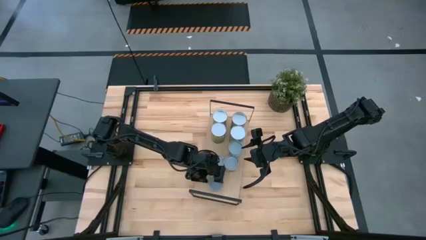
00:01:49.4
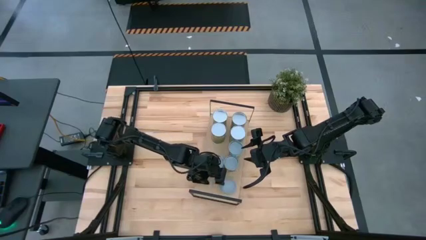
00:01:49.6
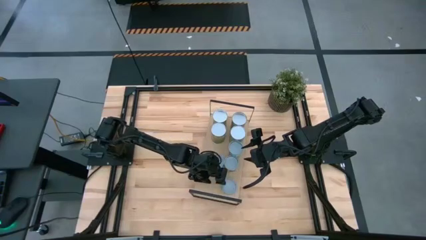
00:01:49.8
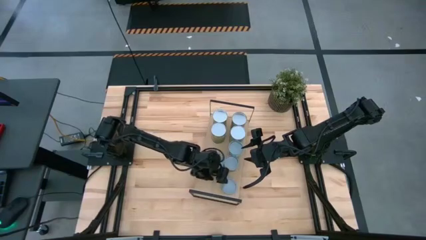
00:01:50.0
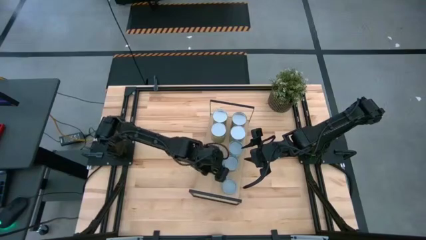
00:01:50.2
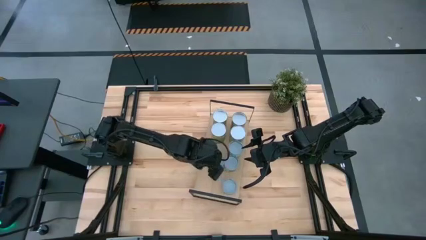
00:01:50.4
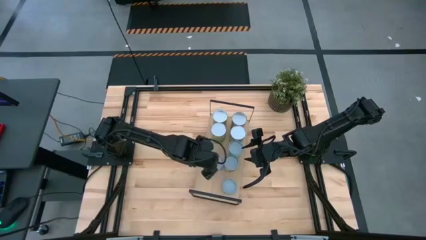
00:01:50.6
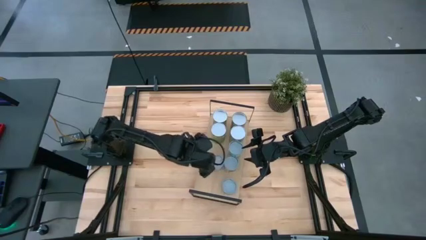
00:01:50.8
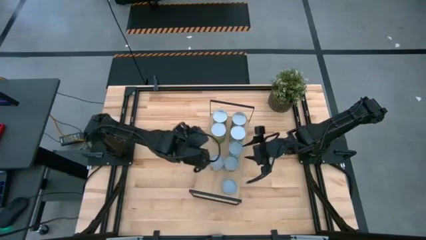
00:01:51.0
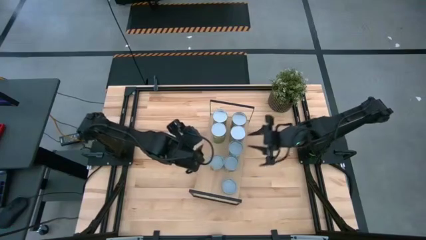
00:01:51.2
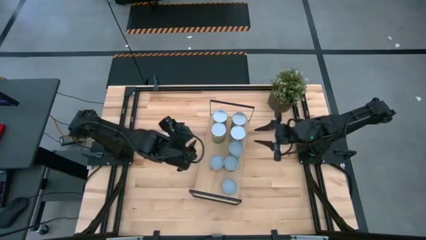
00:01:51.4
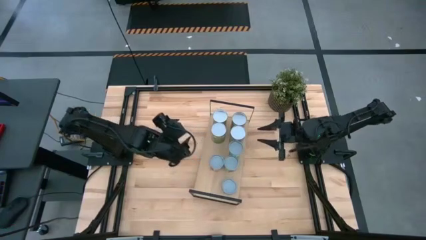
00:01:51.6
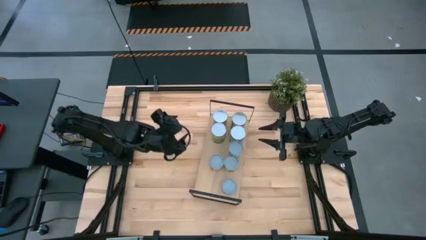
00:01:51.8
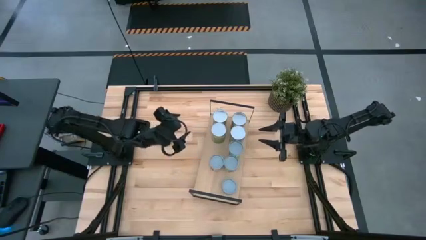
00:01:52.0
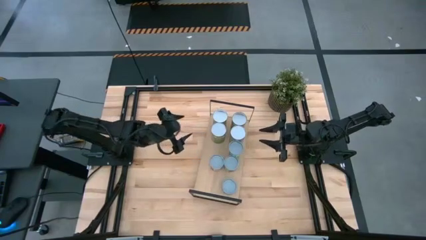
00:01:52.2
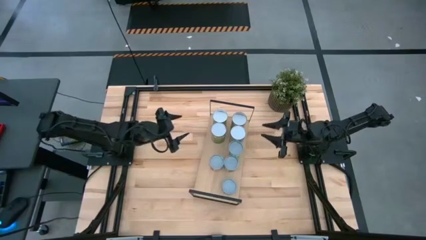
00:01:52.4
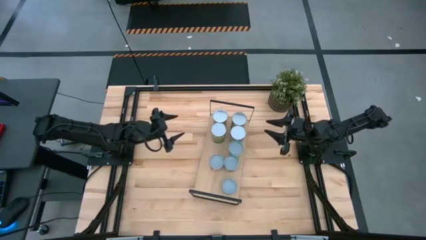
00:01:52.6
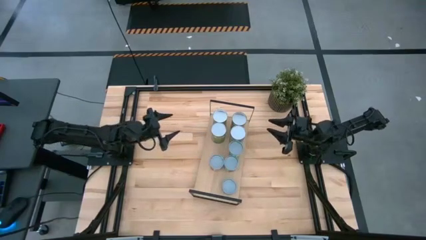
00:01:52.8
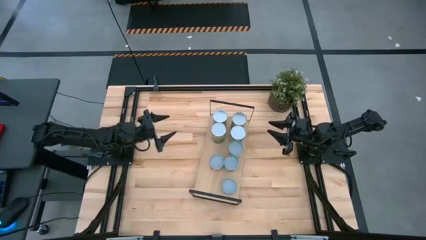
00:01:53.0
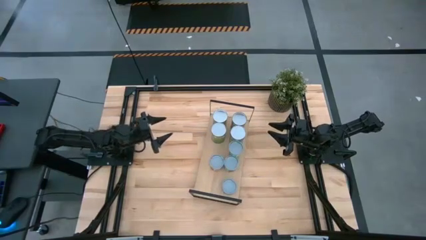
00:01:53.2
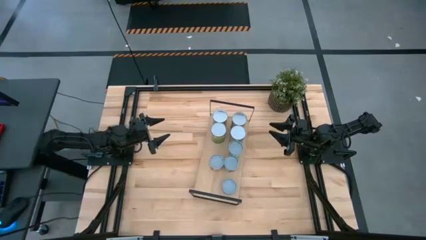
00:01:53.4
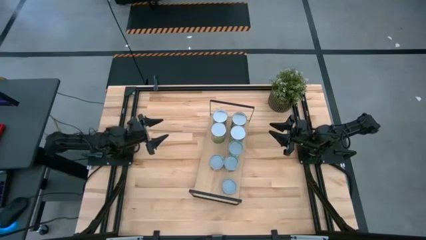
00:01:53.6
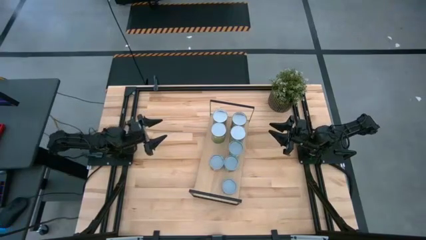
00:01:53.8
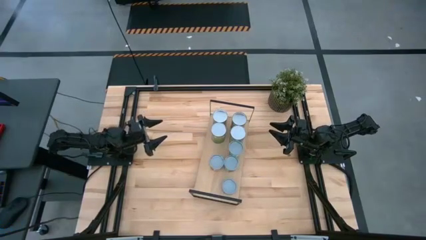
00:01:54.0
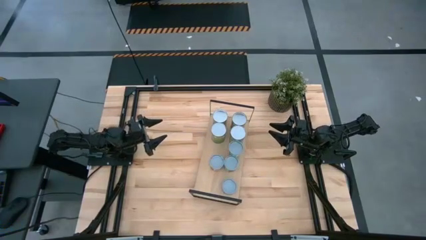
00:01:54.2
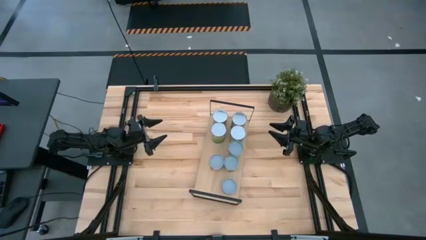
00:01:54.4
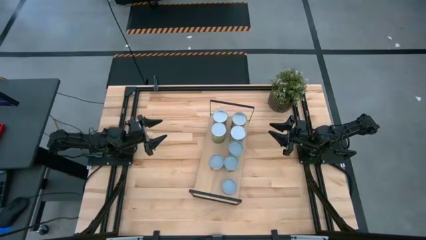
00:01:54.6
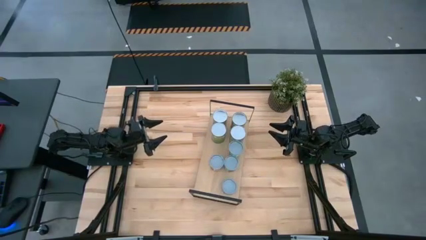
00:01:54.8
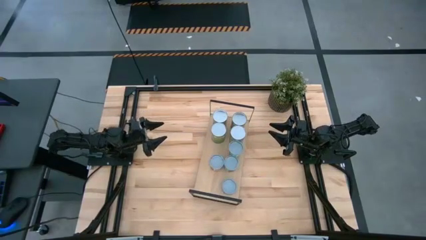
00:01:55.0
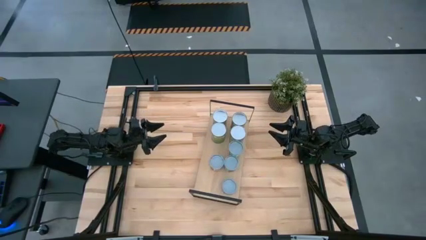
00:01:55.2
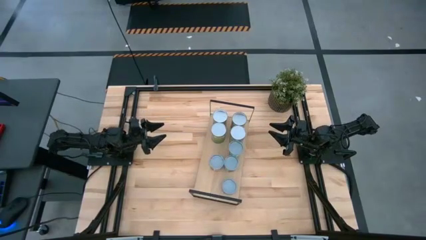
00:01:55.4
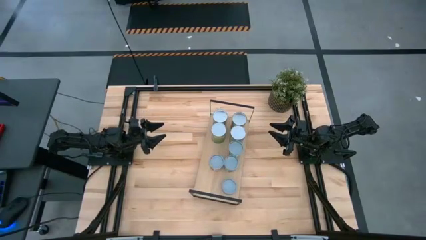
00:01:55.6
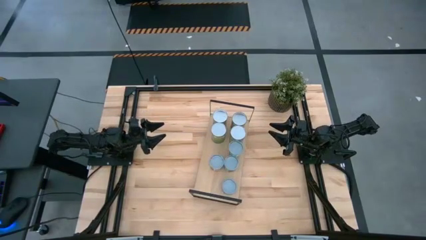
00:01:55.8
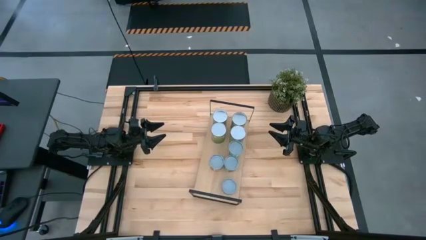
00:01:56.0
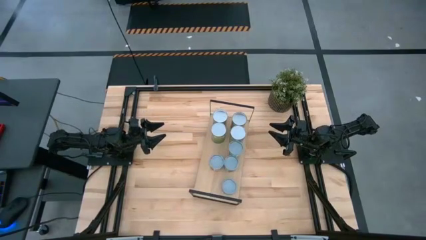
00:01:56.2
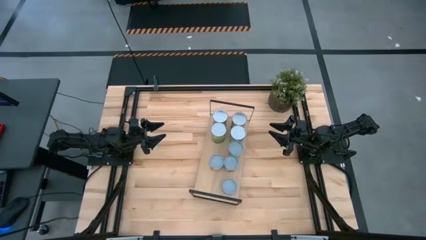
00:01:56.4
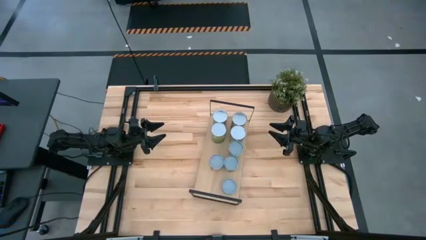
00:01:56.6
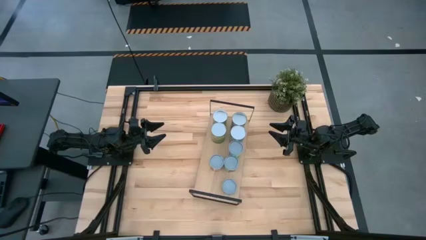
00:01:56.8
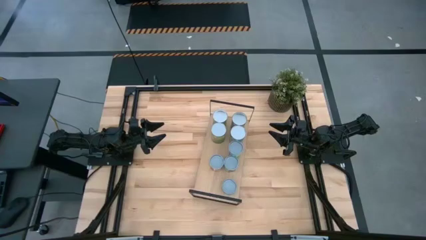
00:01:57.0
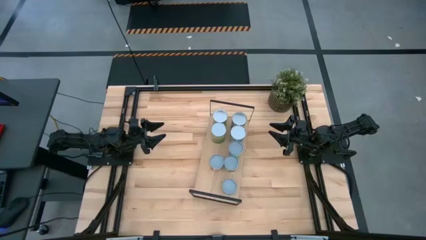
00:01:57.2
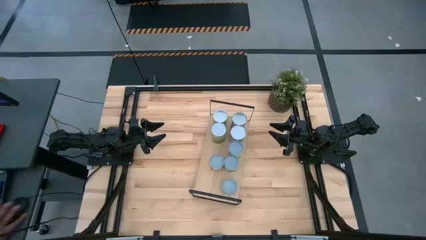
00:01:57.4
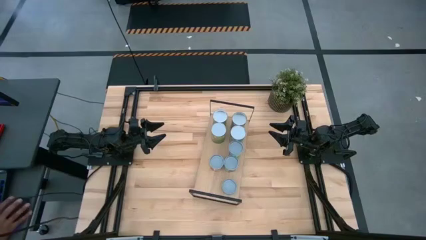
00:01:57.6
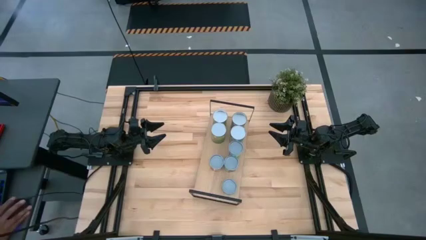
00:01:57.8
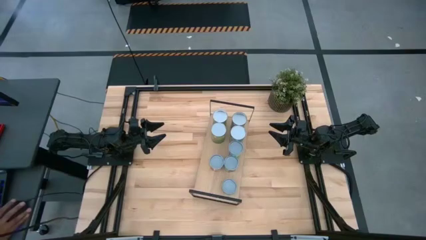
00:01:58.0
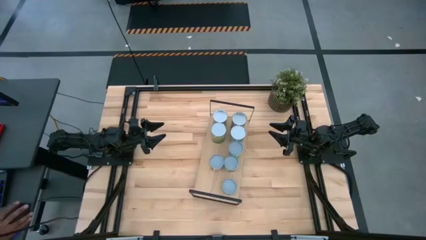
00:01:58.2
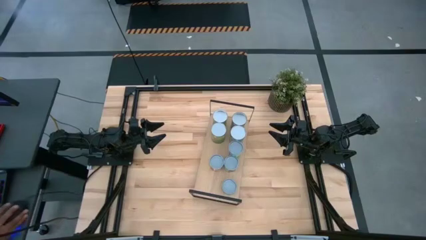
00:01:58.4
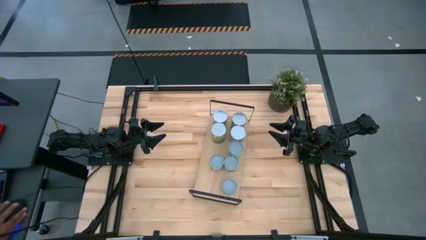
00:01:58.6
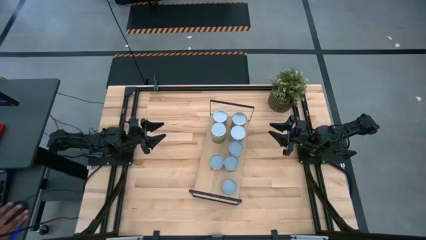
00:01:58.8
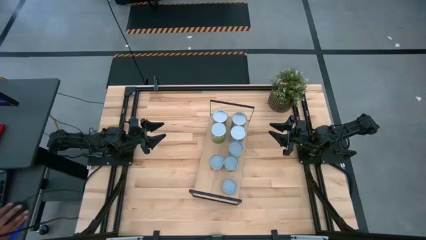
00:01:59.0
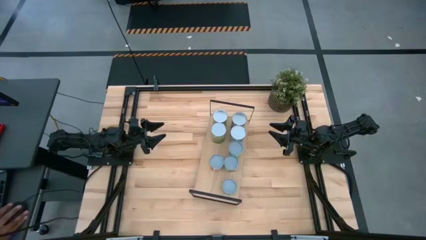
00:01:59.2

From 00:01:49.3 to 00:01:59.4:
Task: Pick and place cans onto a shelf
Return to home position

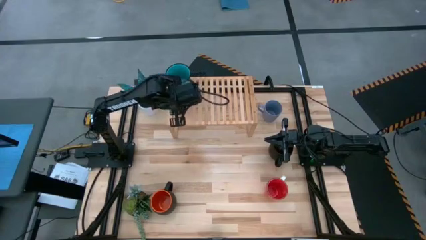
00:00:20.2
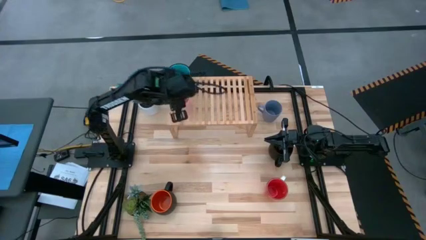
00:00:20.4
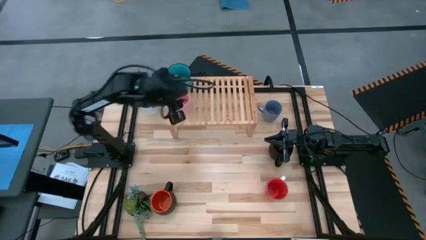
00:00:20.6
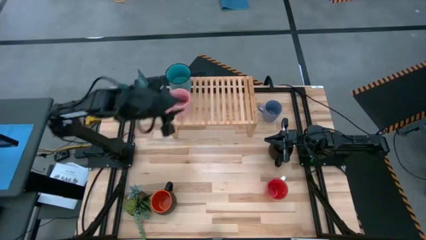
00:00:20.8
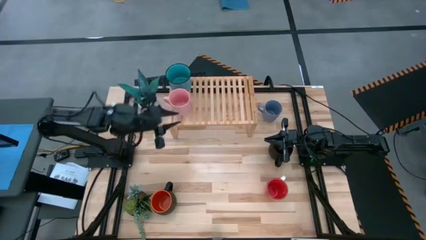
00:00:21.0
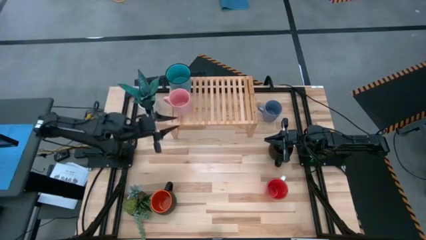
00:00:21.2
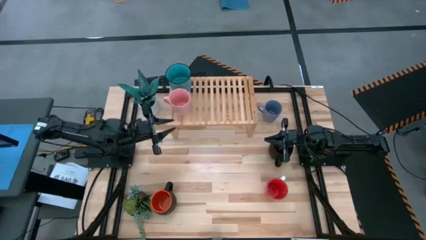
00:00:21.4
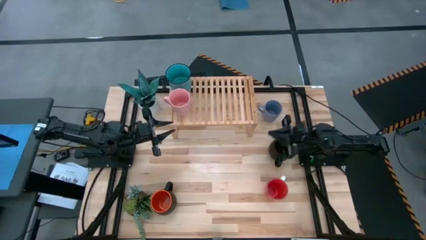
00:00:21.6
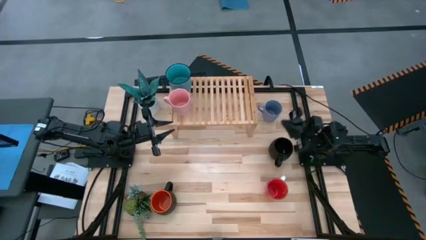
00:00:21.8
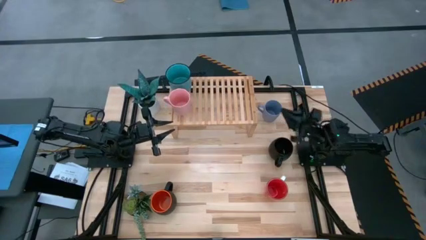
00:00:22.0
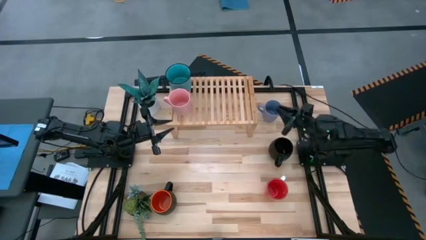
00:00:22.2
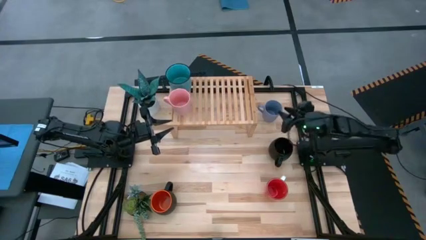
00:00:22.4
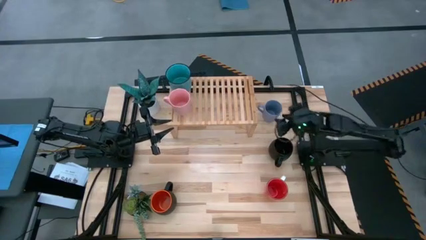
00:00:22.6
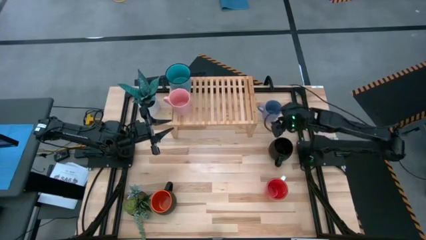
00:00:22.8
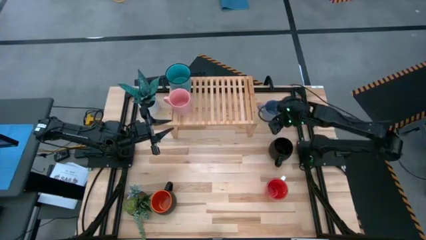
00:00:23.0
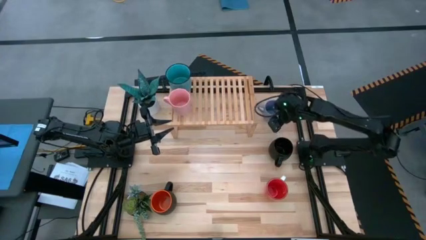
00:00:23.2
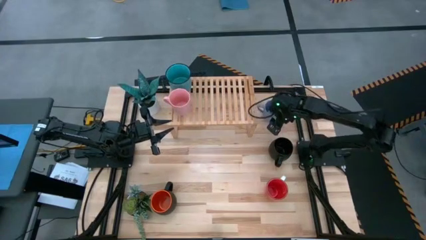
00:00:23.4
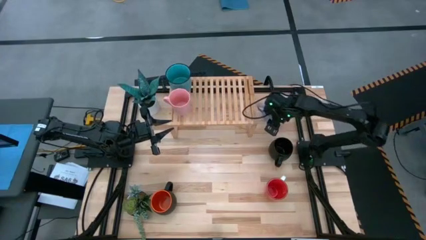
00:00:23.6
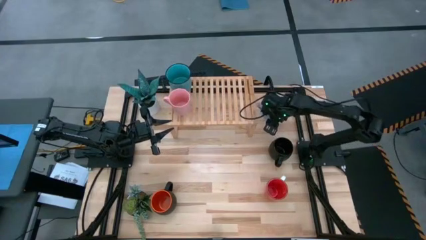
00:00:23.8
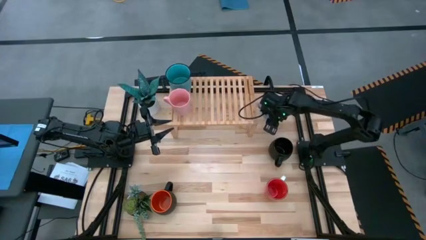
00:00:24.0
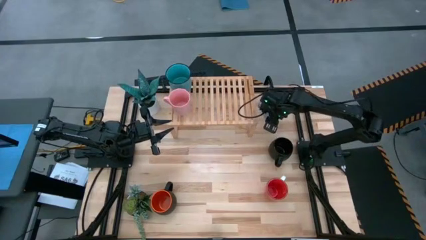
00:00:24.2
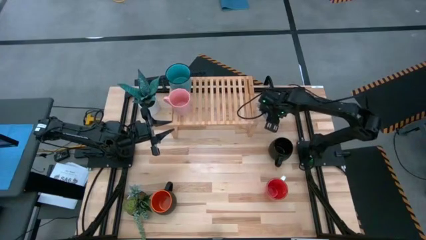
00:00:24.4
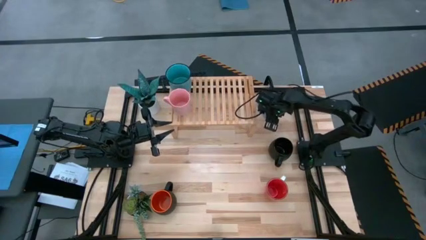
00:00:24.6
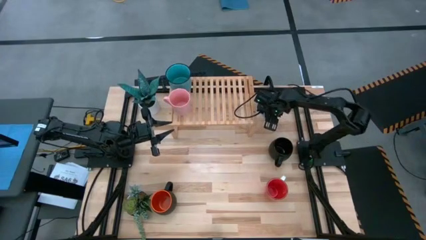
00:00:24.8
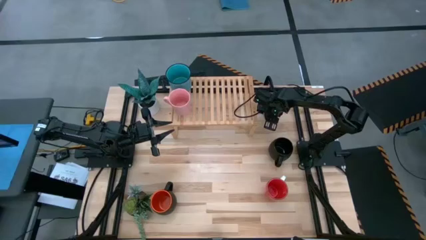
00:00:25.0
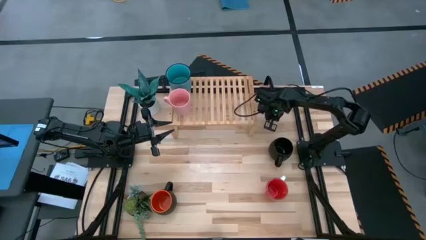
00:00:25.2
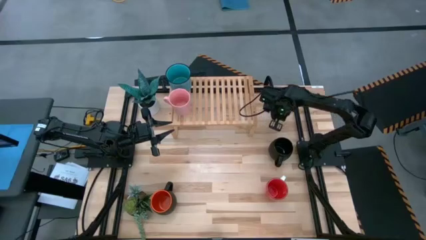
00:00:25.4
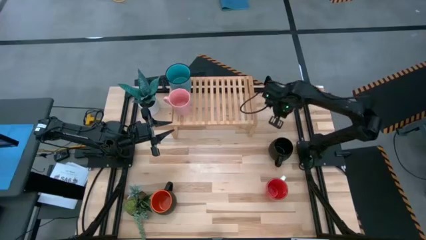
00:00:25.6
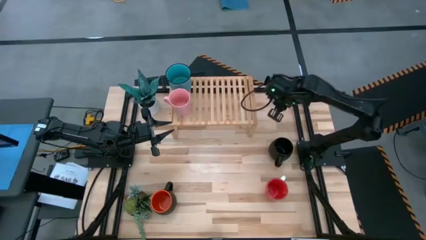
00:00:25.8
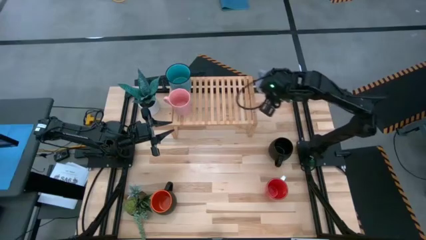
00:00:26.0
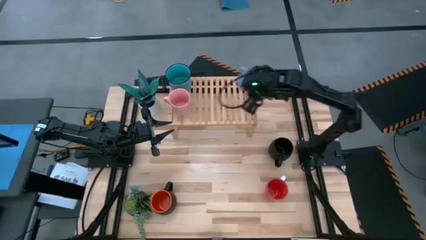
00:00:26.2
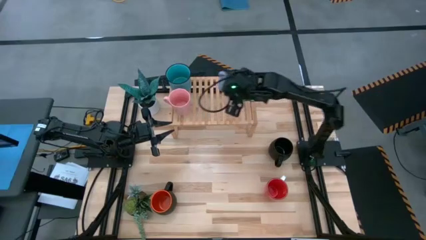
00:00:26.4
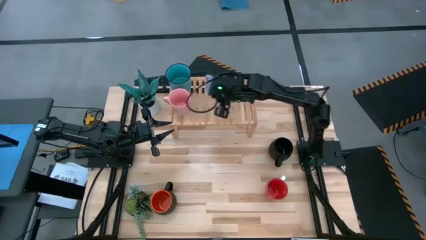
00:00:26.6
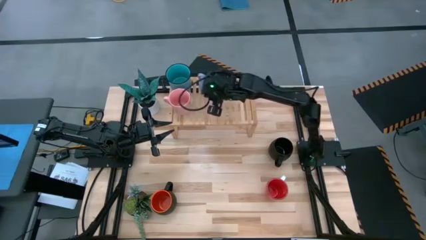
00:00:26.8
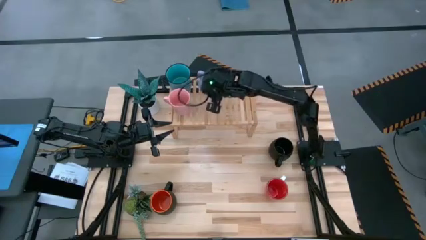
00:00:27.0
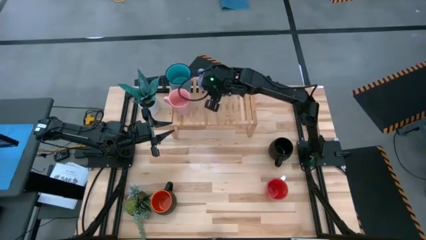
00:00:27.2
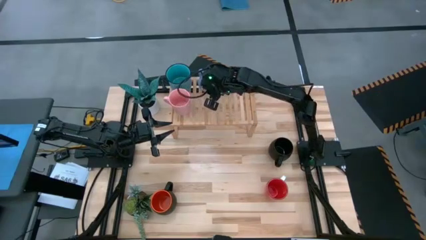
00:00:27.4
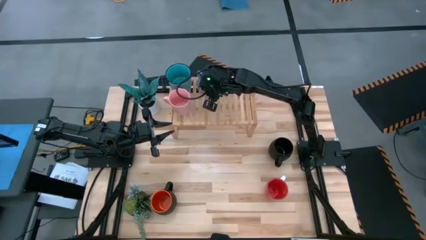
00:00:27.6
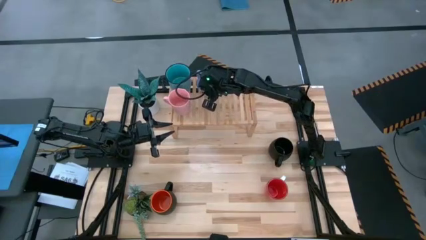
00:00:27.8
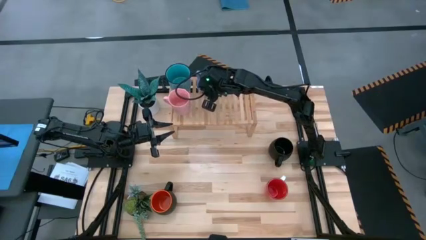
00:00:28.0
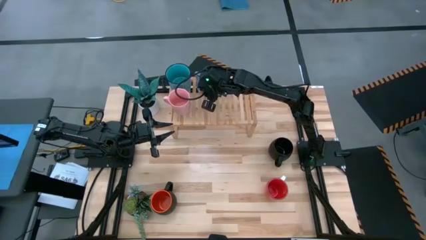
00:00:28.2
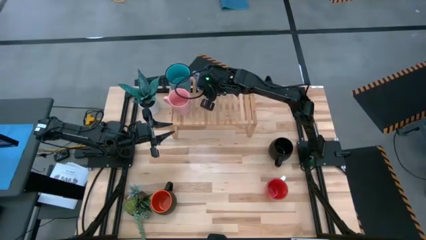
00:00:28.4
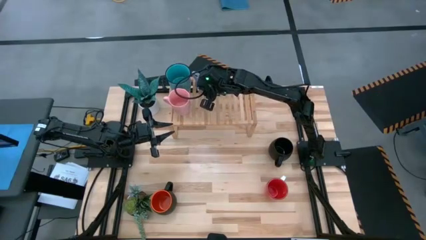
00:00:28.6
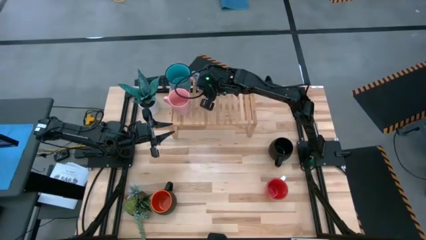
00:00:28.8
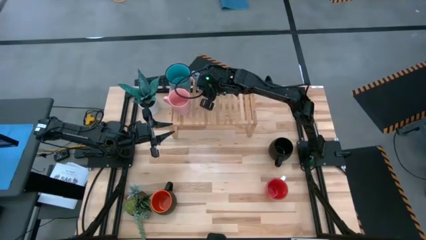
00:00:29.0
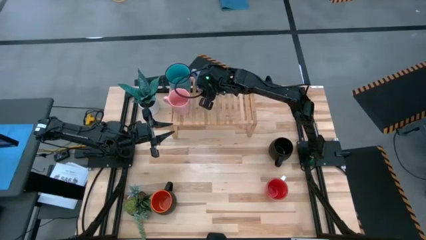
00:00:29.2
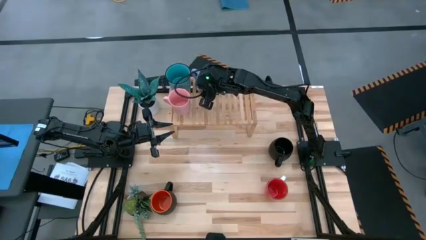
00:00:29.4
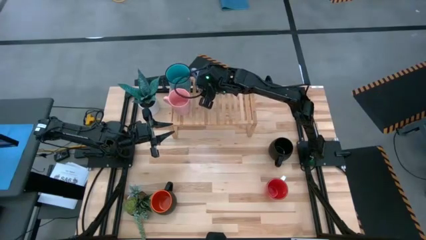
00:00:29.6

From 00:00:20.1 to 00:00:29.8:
Task: Place coffee mugs
Put the blue mug on the shelf
